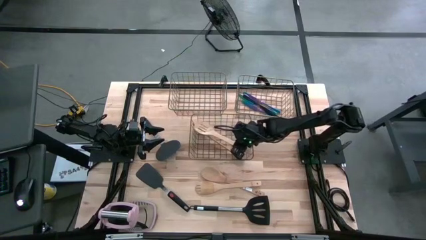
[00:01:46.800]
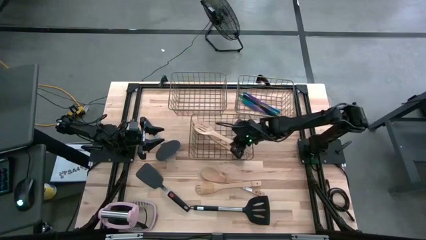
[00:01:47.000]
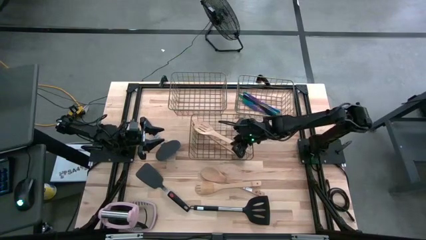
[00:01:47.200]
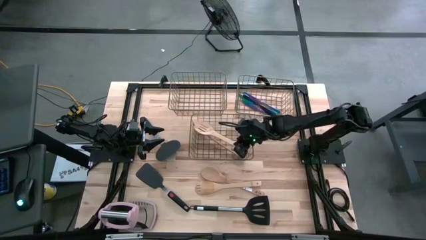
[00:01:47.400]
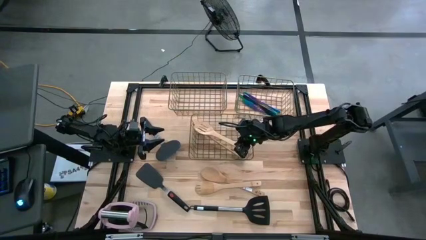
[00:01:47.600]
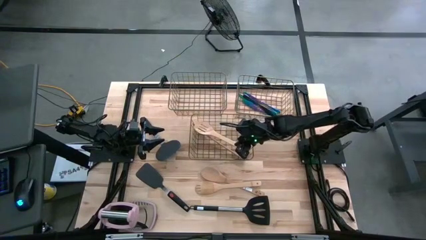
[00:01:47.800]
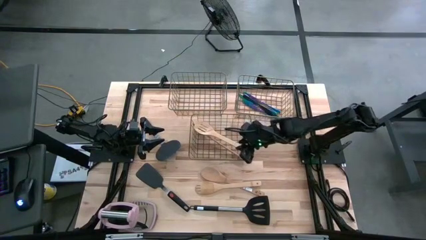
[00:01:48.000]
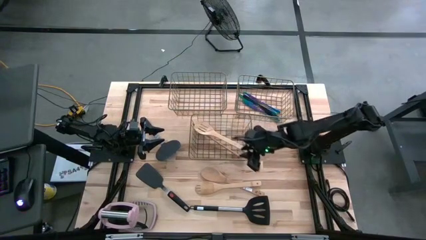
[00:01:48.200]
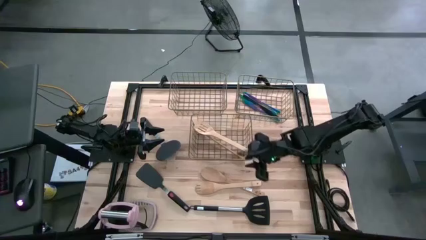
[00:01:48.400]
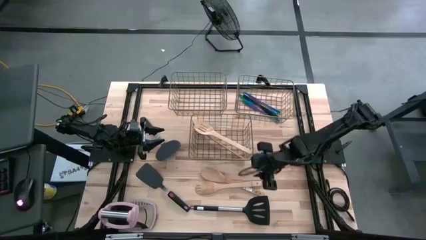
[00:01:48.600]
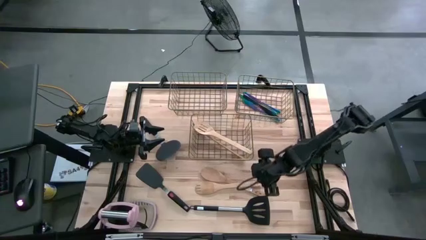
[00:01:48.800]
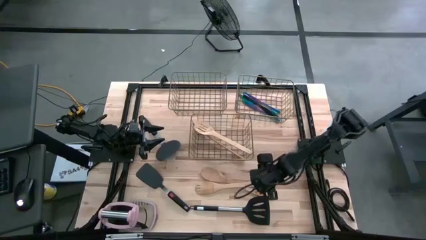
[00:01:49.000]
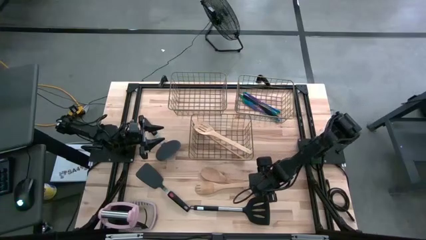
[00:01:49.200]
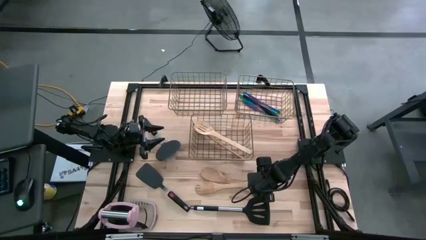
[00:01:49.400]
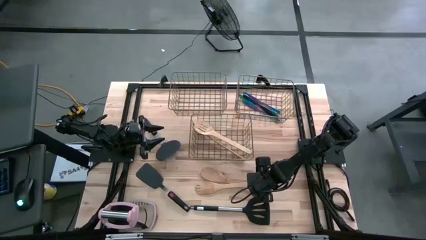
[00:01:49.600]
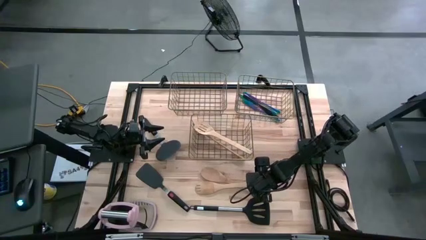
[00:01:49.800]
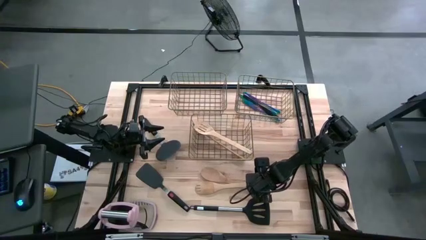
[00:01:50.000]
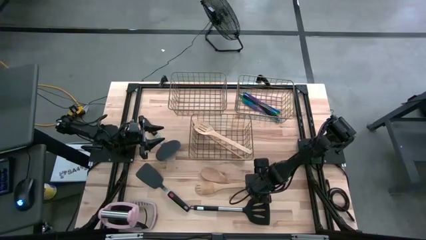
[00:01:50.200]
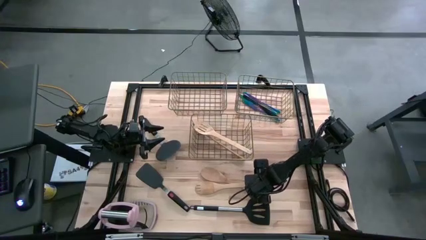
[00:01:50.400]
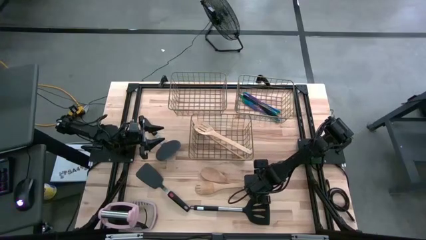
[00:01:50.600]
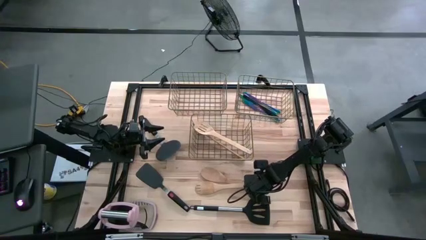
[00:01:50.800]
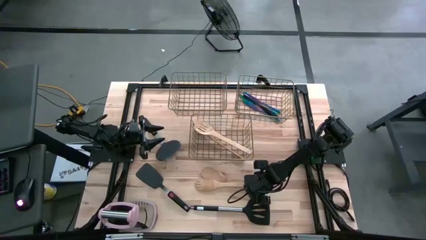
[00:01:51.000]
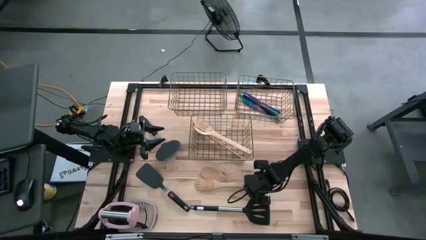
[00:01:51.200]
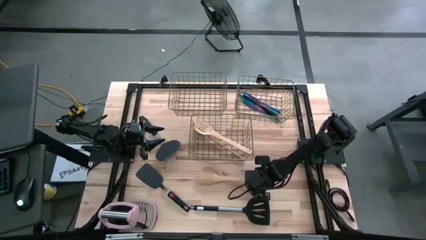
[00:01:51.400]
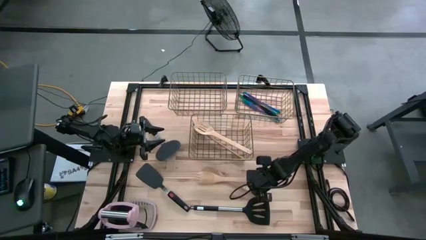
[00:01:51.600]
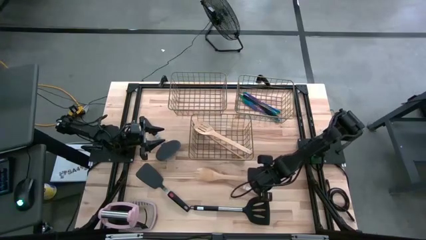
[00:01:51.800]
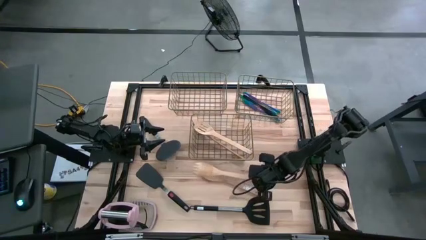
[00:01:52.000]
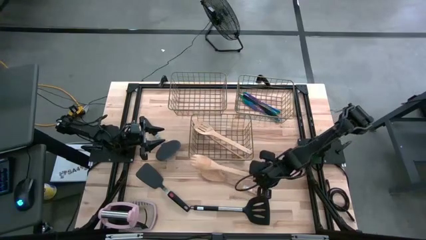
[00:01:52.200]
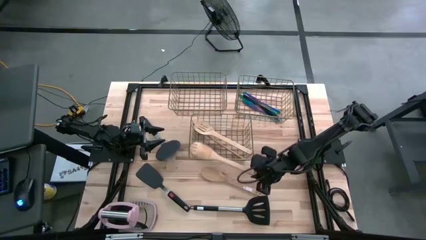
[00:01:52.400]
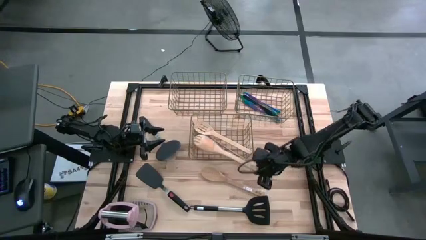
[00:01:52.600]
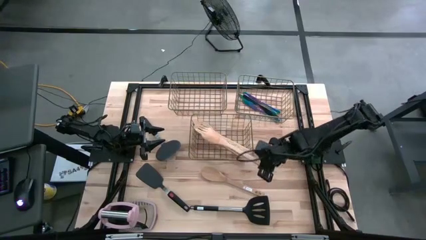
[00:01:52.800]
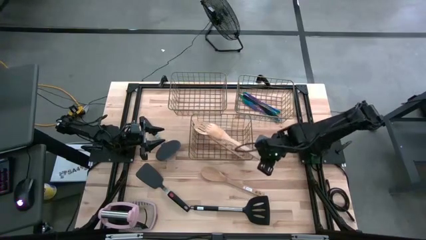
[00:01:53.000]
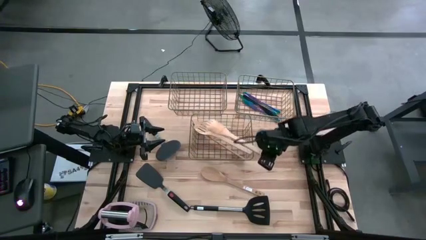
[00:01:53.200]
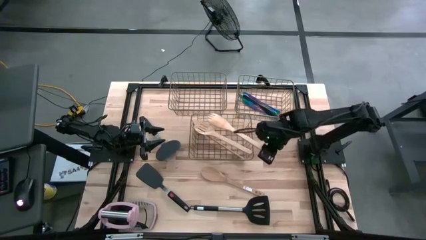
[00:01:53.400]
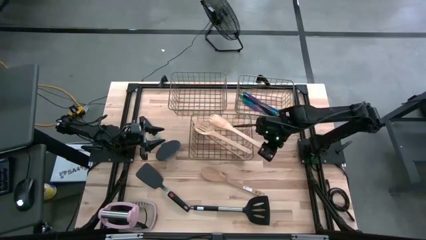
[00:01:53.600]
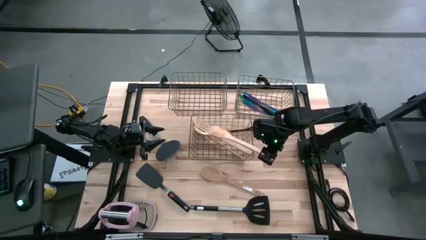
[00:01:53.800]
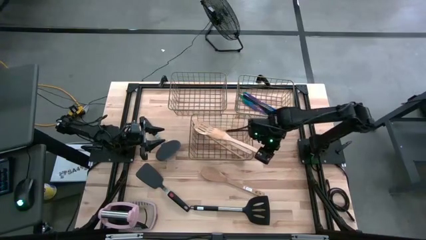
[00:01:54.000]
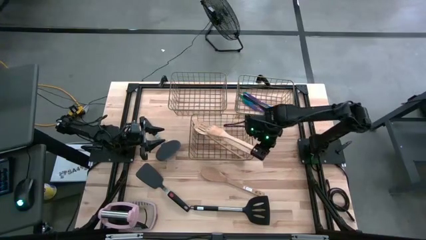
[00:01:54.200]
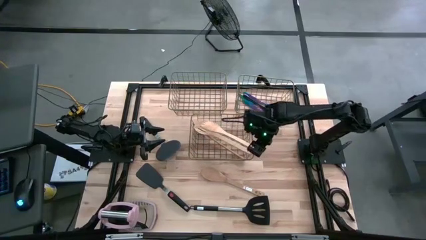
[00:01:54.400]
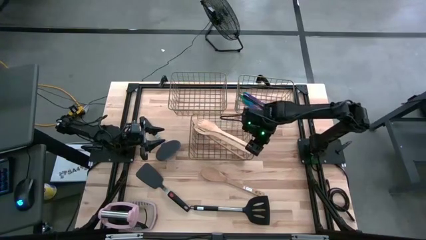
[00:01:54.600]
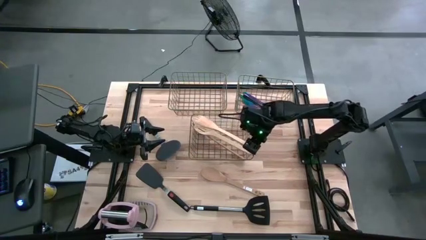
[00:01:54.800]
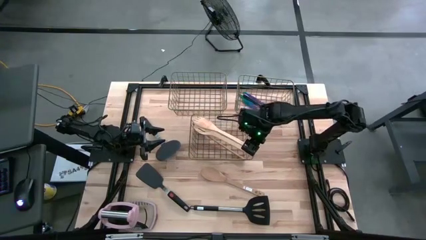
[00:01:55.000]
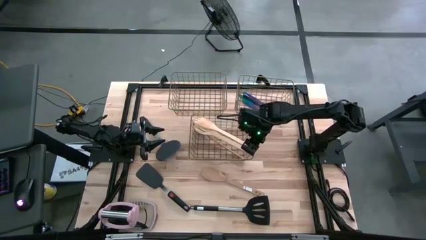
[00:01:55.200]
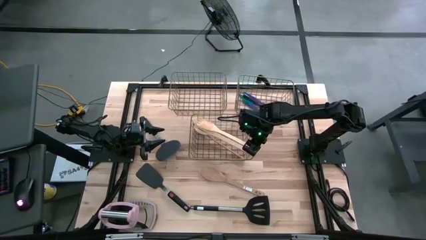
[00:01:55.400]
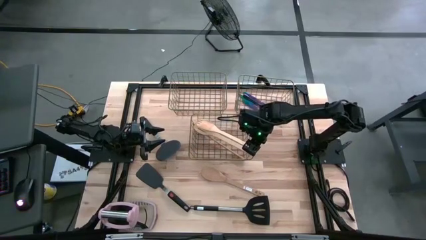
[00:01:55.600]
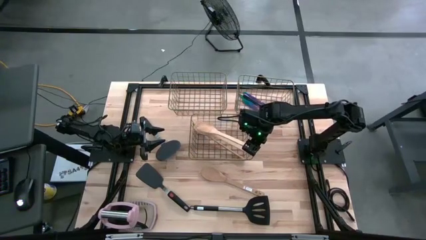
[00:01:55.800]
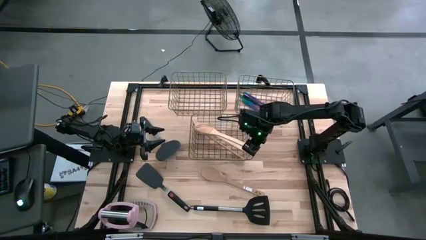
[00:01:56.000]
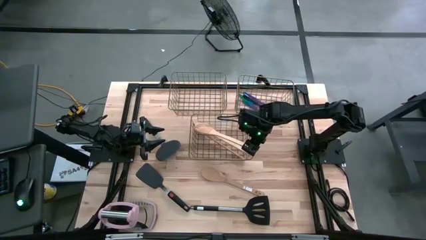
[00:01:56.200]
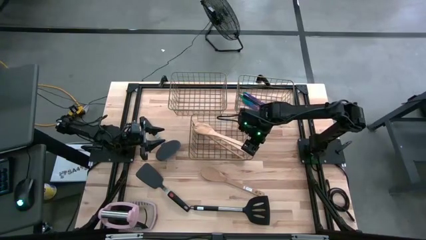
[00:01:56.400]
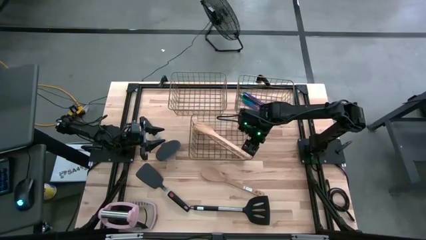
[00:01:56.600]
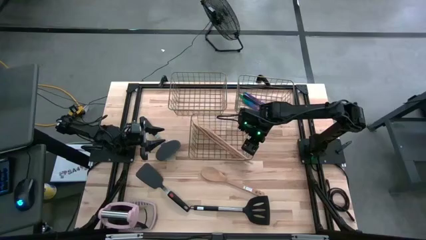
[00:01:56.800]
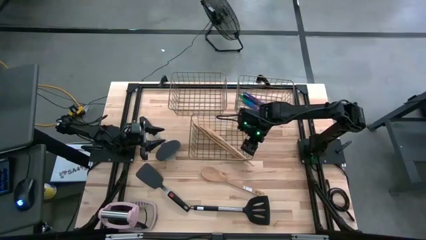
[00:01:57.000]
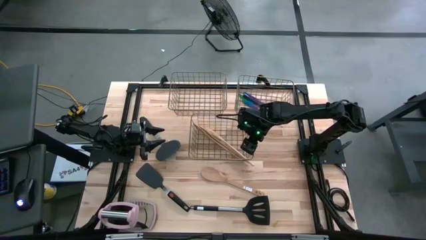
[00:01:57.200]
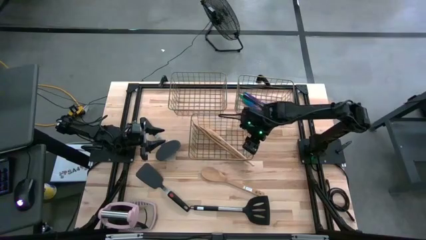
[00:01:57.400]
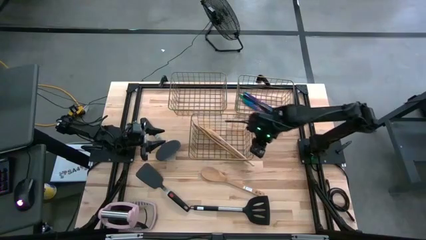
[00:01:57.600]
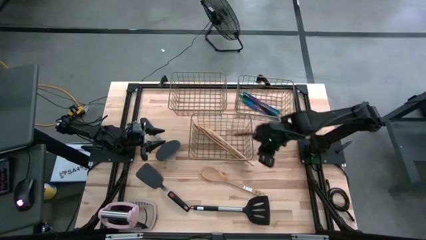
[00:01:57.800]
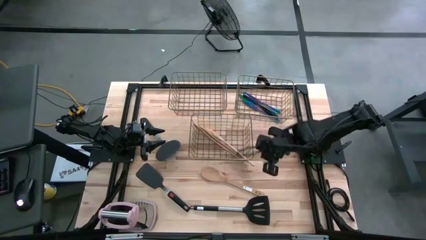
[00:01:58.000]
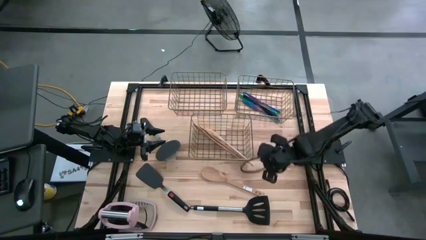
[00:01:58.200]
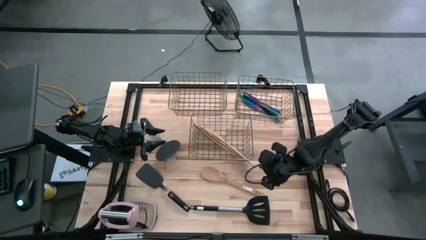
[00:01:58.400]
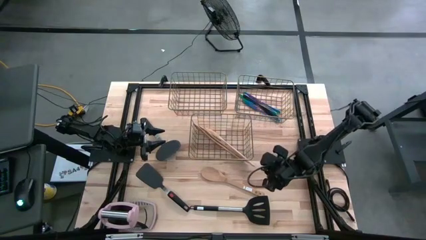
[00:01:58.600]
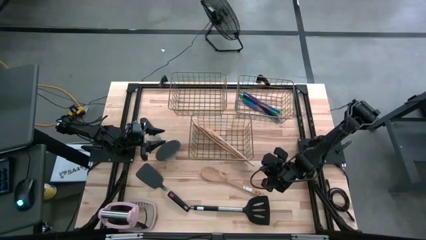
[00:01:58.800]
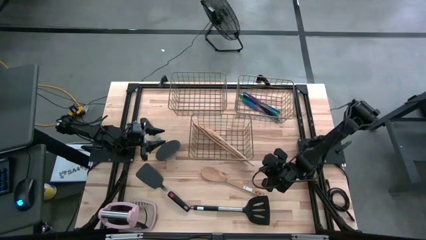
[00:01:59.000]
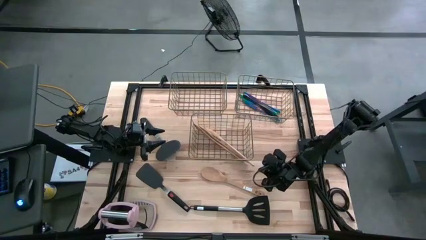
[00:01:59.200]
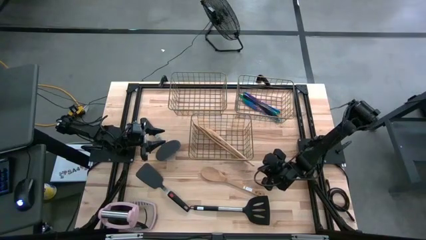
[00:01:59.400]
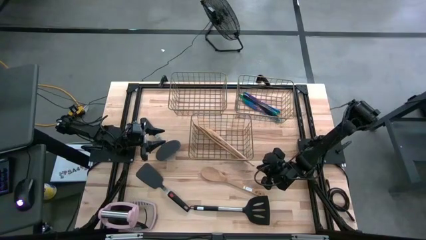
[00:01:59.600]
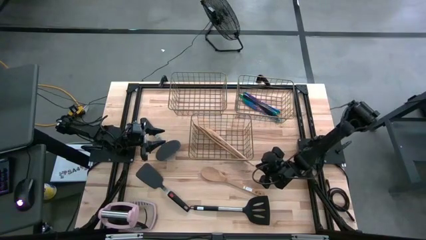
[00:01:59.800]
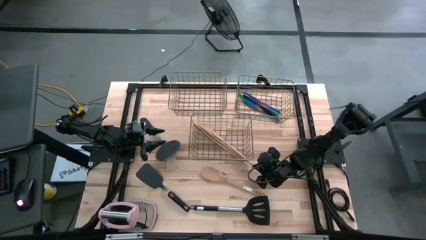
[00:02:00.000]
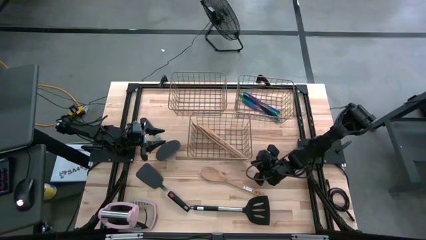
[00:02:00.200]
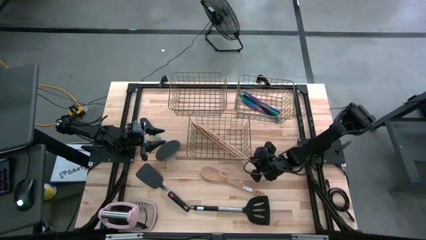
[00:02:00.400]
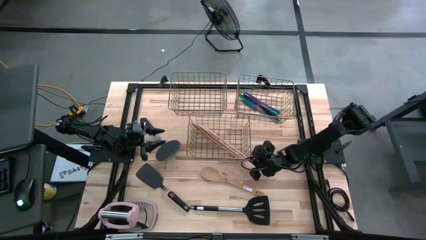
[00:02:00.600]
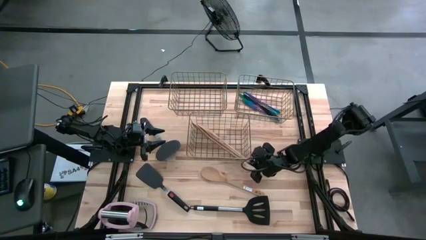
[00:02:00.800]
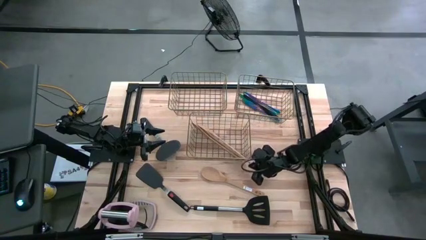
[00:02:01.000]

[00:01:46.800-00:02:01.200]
Task: Pick & Place Kitchen Items
Put the wooden spatula into the bottom wire basket
